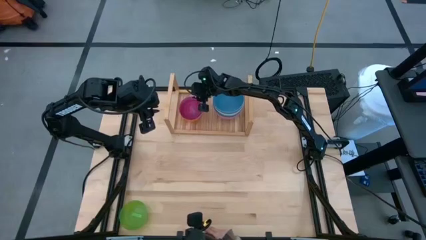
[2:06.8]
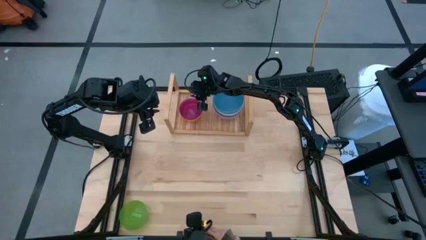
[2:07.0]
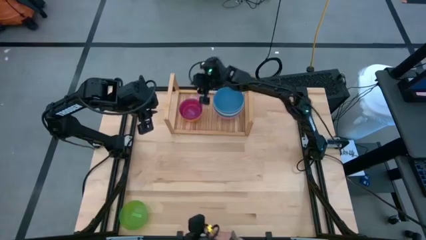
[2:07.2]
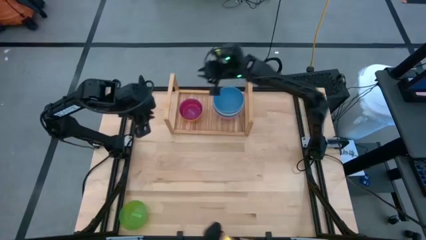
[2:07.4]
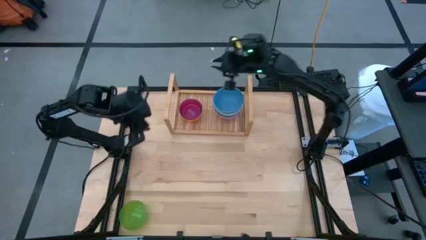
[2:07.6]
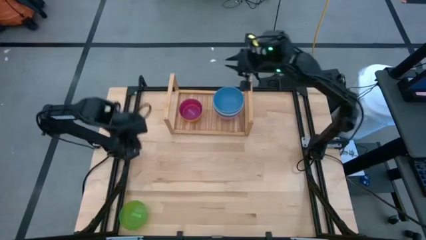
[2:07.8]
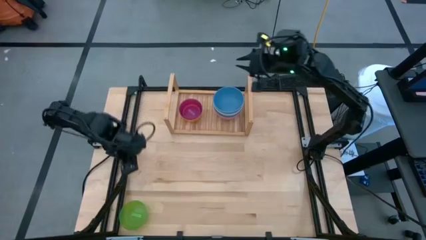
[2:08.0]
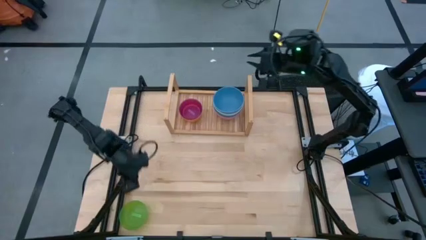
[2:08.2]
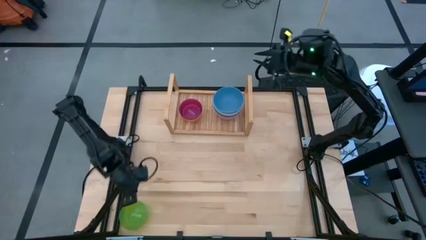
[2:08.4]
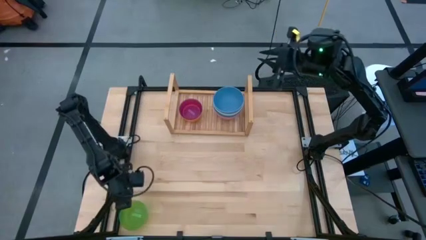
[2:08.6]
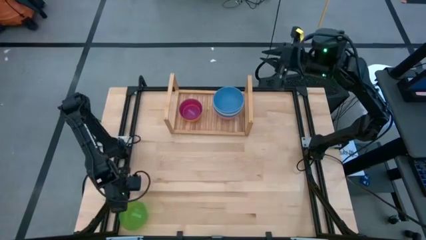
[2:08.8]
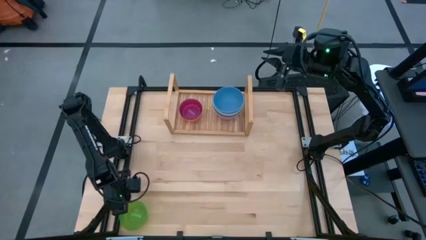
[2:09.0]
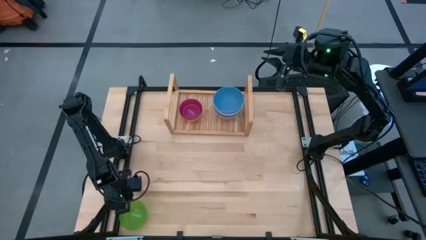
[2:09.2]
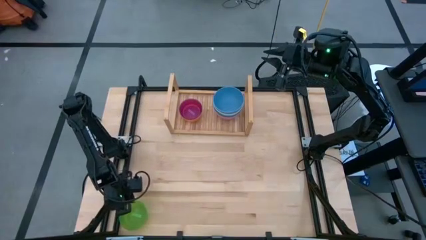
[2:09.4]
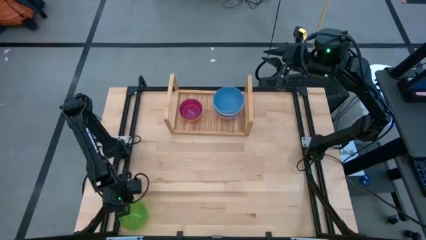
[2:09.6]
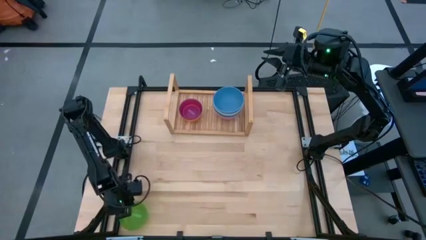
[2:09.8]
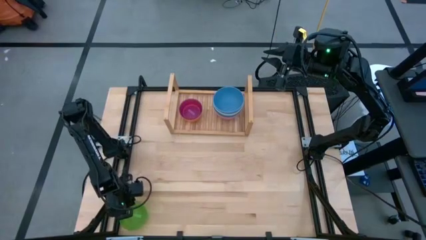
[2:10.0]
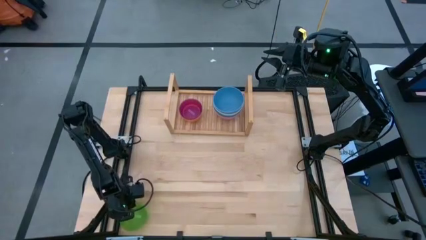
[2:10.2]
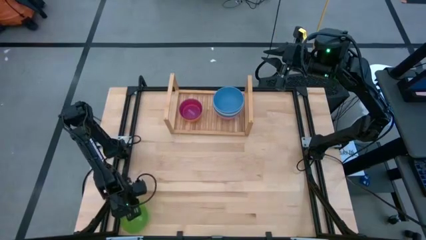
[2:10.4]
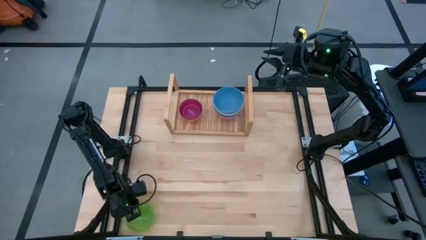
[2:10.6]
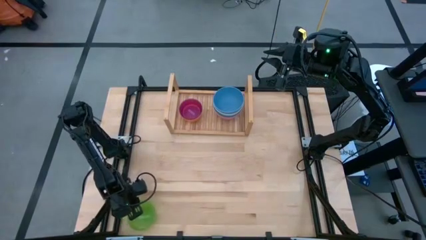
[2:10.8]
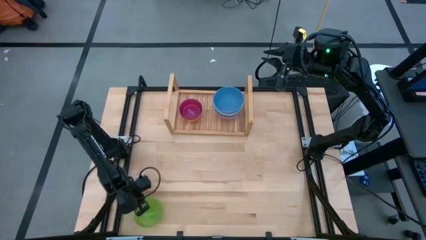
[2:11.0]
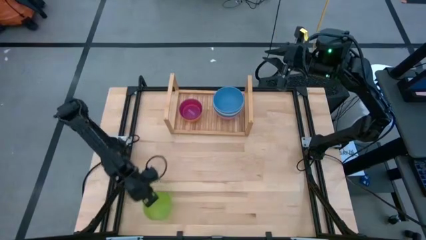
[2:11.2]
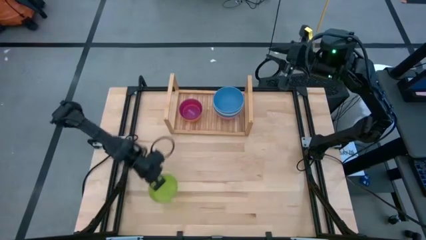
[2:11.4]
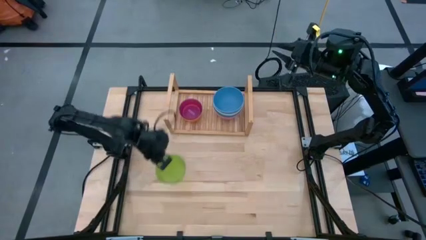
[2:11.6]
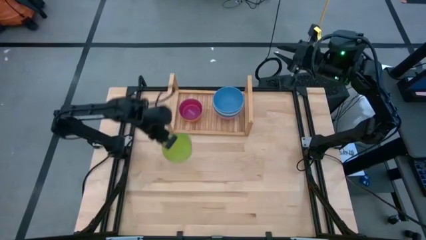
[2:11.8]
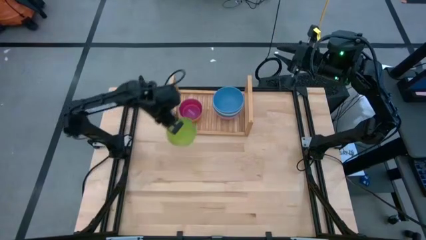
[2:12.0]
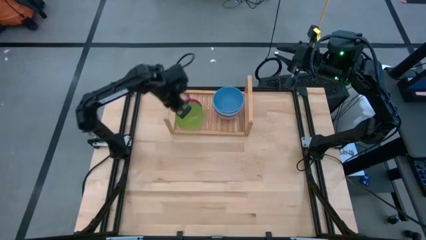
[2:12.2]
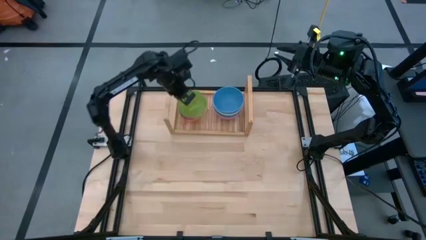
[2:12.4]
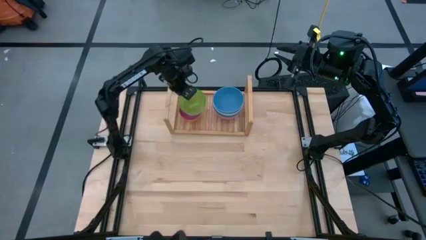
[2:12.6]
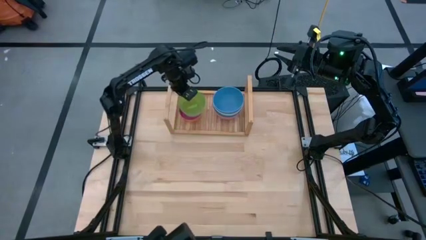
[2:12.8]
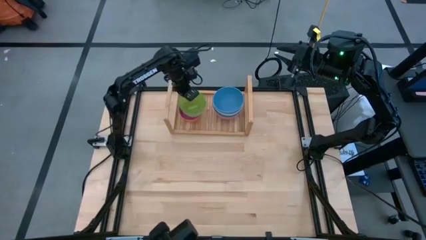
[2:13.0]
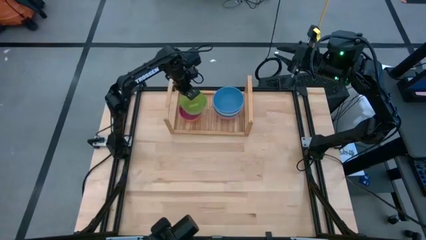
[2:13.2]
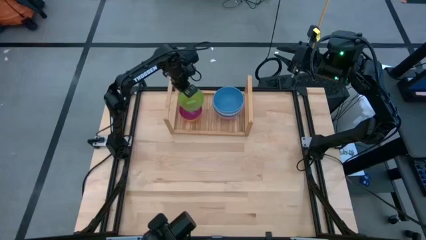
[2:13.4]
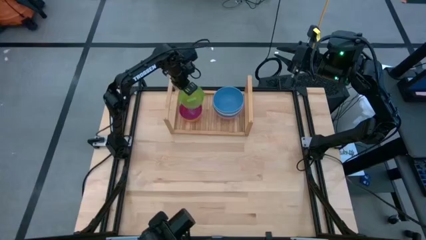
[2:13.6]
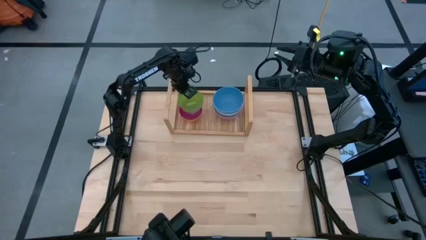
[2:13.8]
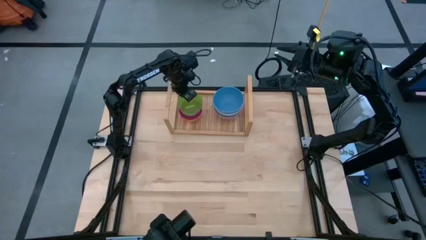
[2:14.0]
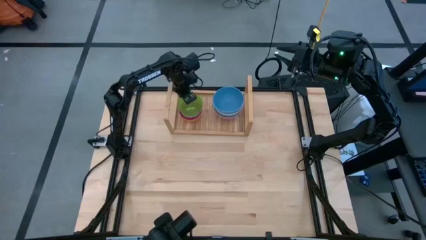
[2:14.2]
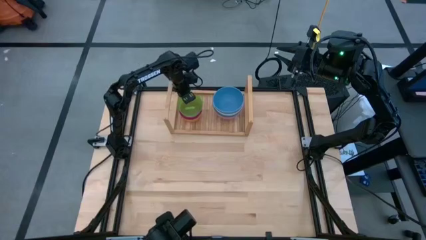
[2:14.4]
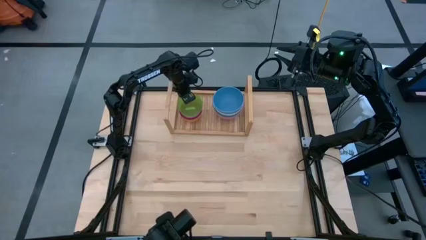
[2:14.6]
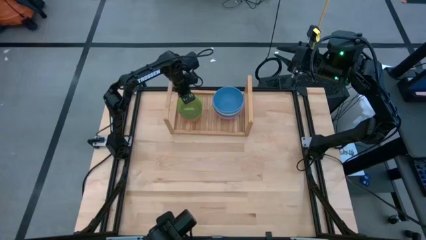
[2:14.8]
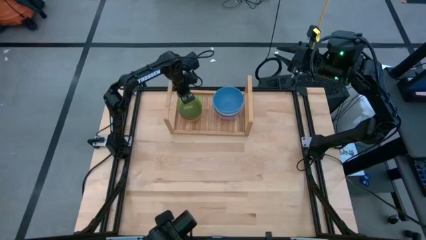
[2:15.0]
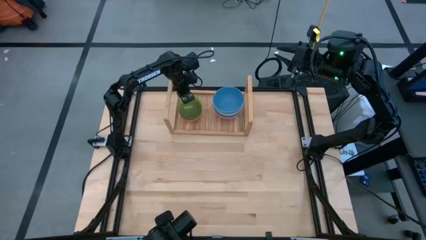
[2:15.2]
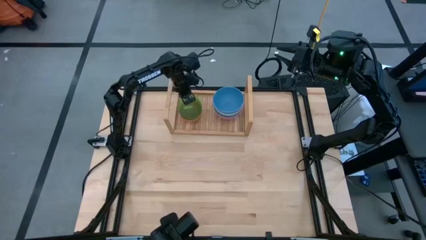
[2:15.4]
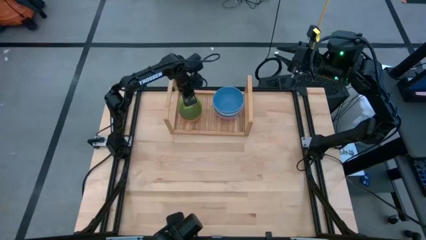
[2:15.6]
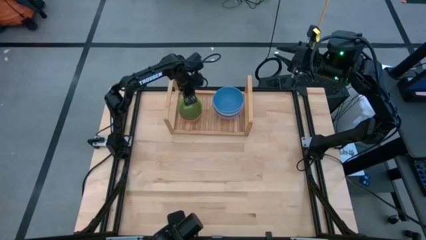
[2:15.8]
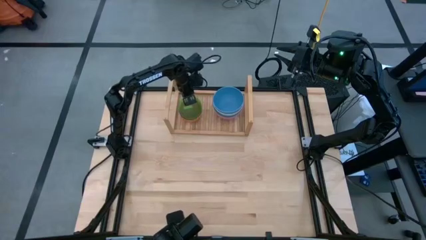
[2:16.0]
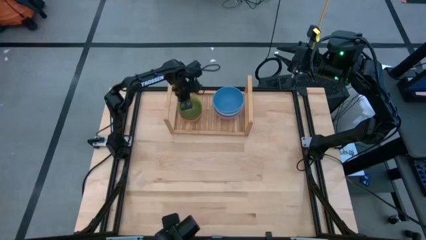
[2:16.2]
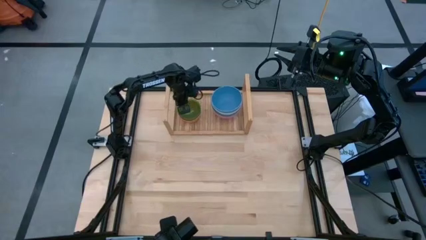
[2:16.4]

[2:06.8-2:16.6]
Task: Place and stack bowls onto a shelf
Stack the green bowl onto the violet bowl

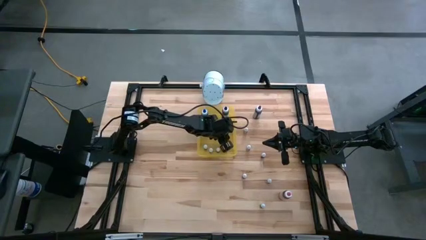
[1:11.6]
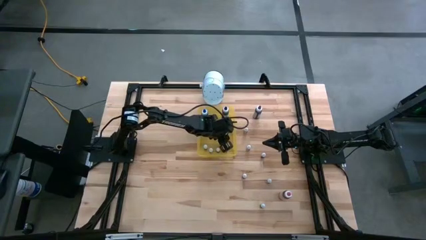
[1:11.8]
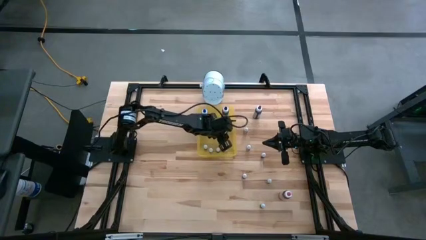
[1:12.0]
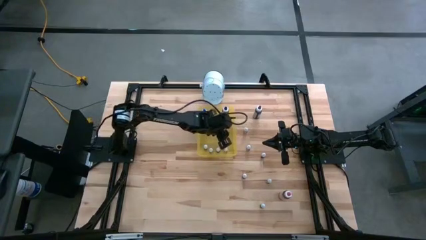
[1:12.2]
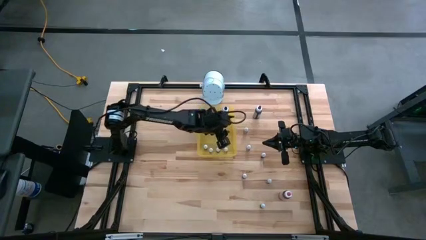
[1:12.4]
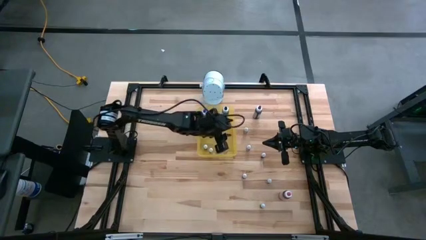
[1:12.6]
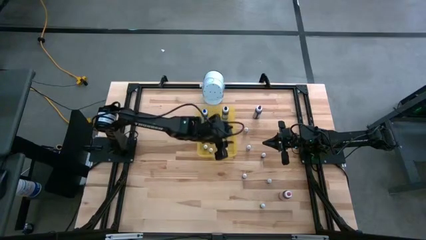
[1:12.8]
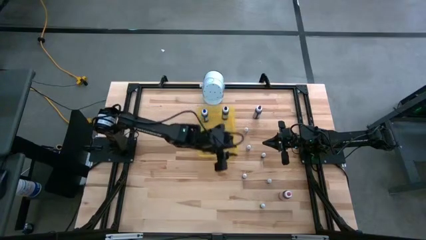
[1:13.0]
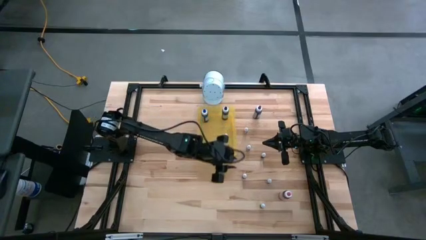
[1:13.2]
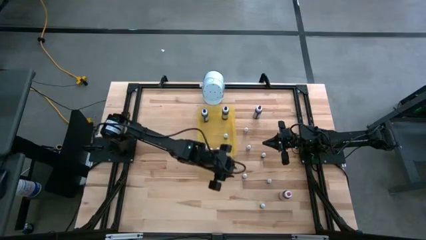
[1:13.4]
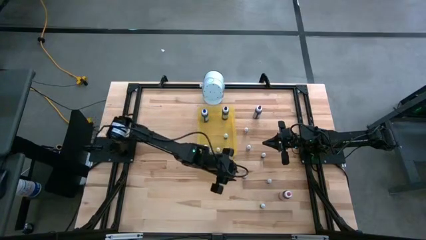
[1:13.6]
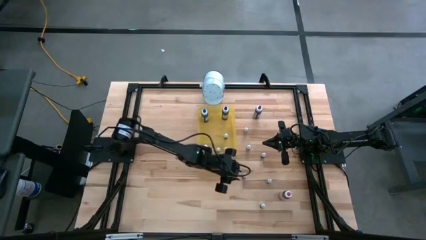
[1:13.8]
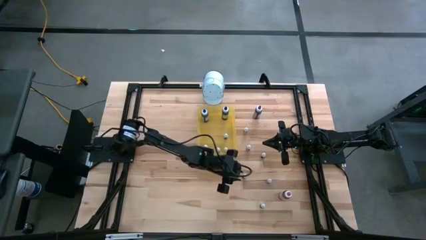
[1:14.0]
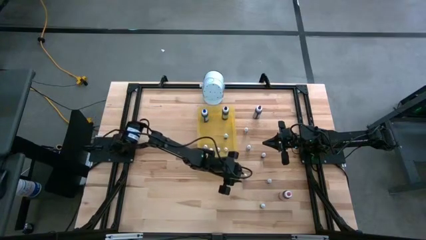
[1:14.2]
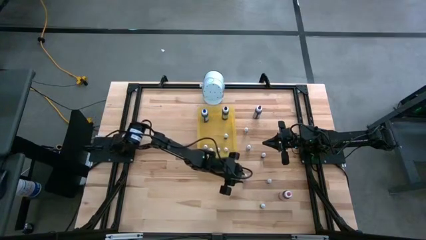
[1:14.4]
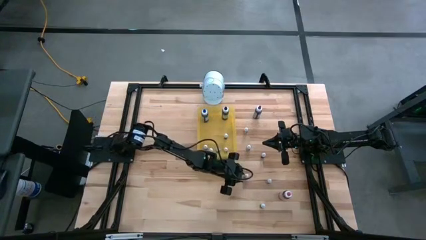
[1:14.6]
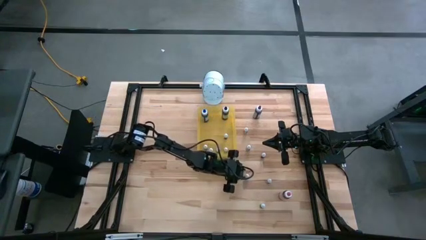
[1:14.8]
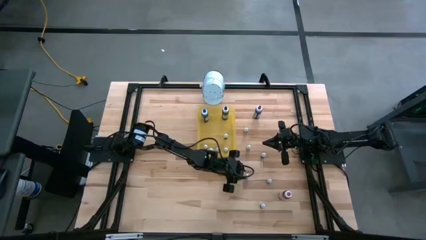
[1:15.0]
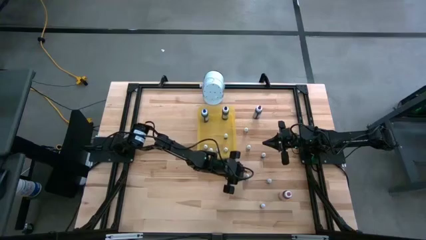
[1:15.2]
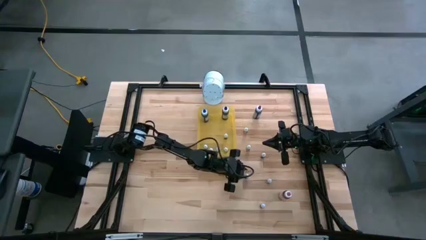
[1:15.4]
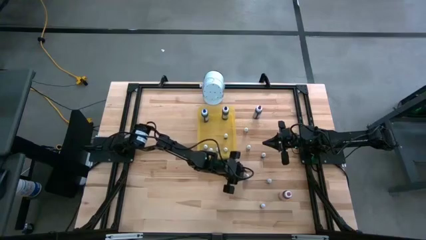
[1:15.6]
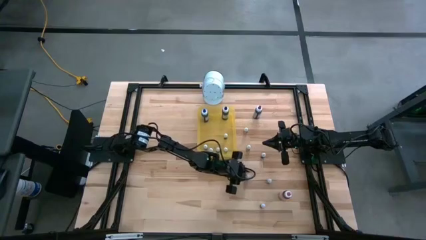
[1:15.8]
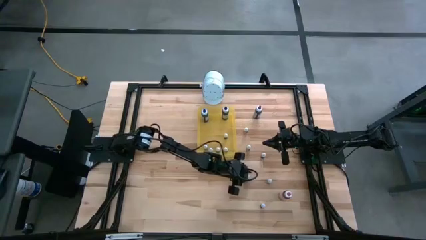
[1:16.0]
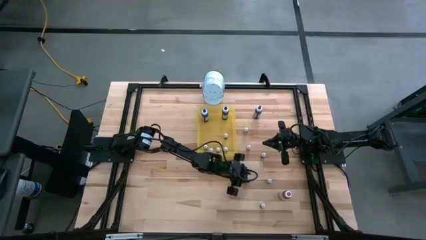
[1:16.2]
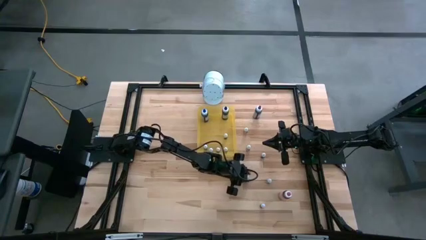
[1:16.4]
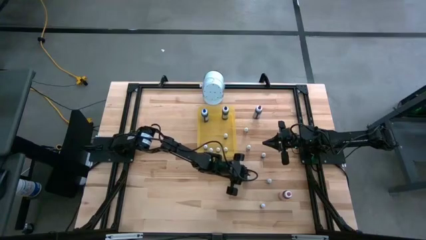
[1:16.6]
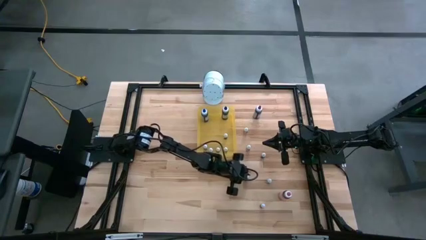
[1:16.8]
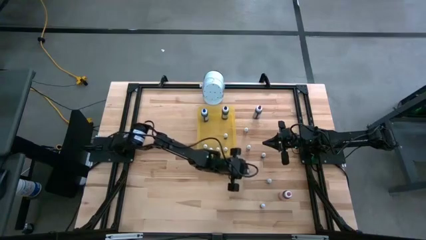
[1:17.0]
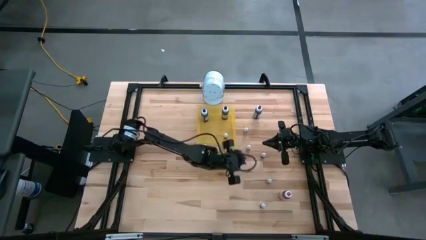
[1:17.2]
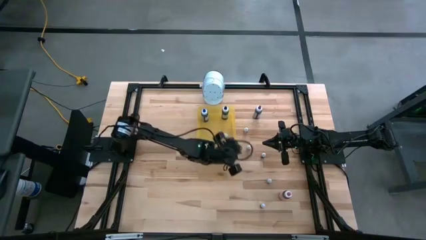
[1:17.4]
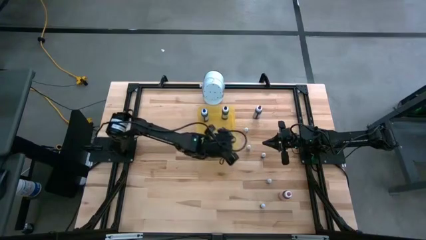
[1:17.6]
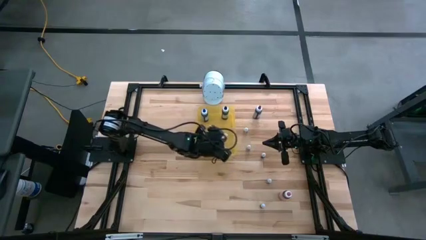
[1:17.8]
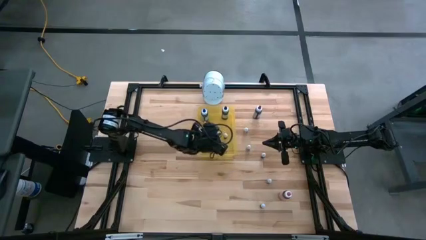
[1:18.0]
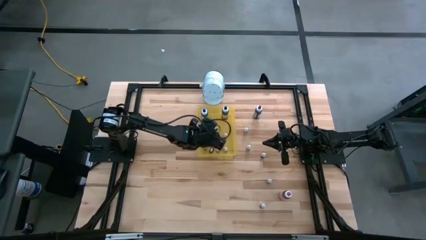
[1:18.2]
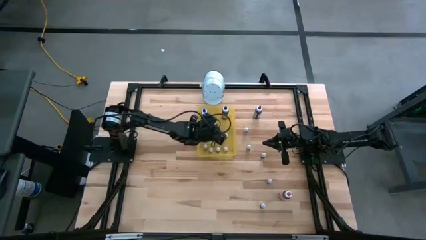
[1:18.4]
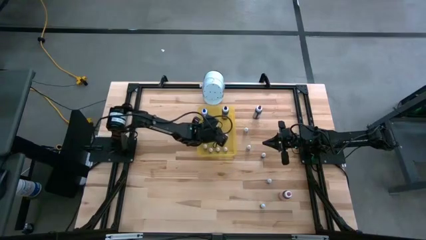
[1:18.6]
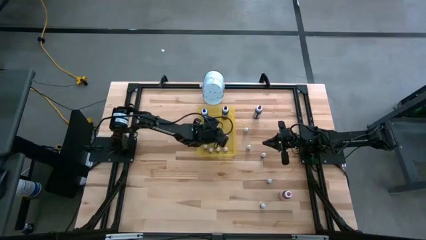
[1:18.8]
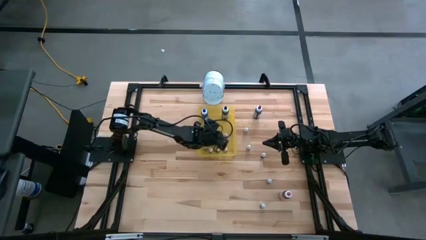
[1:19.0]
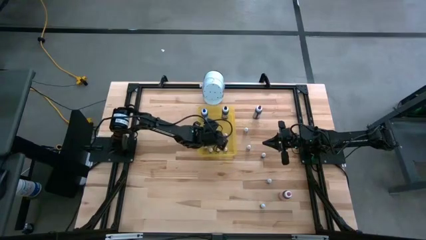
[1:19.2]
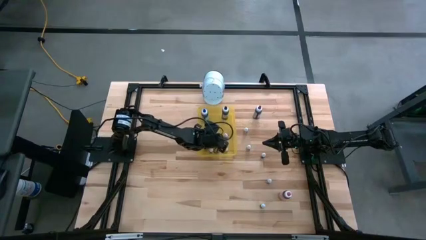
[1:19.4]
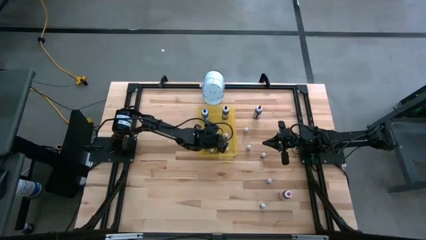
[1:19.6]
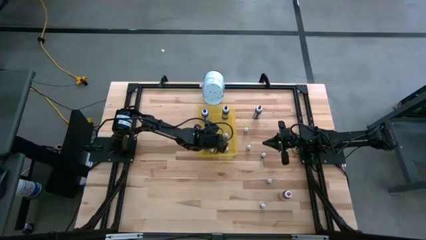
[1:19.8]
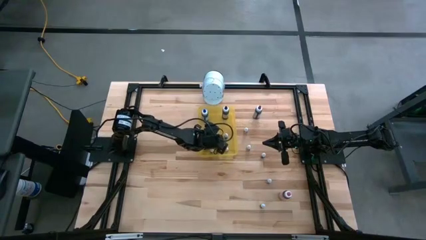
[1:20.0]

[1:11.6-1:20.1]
Task: Pick & Place food coloring
Put the small orange food coloring bottle in the yellow transparent bin
